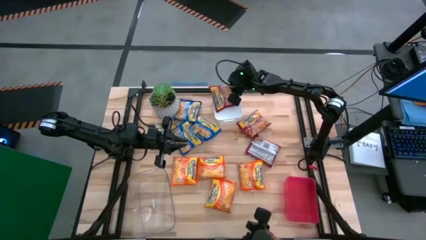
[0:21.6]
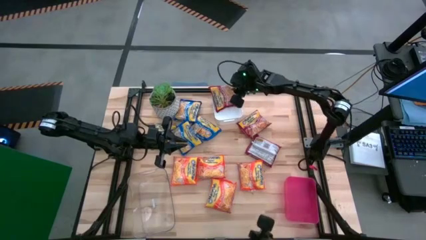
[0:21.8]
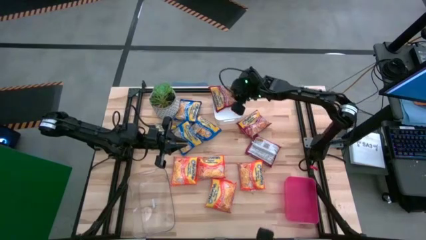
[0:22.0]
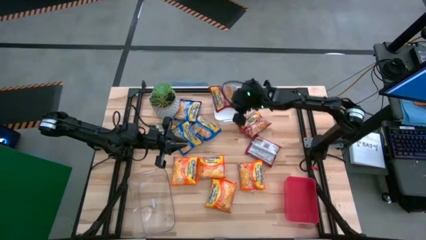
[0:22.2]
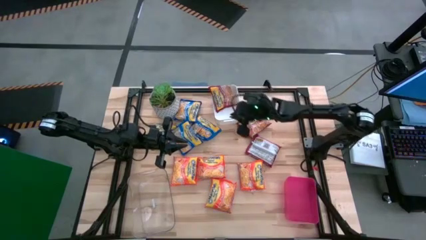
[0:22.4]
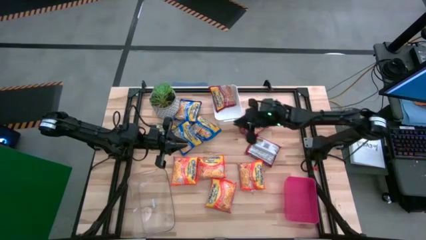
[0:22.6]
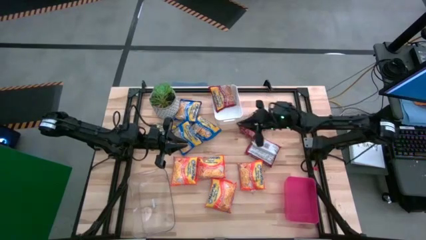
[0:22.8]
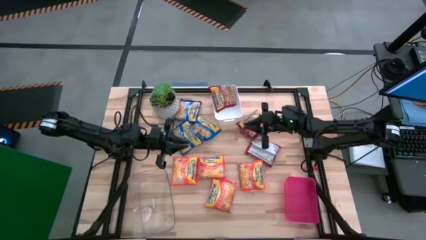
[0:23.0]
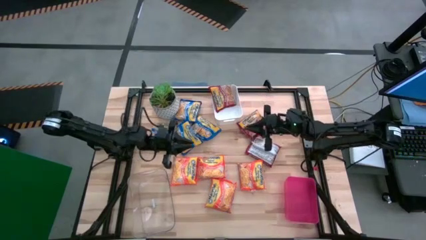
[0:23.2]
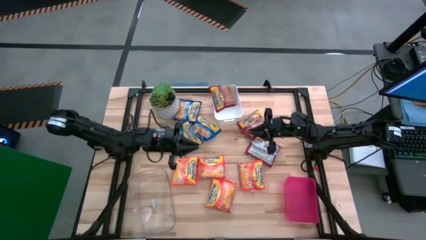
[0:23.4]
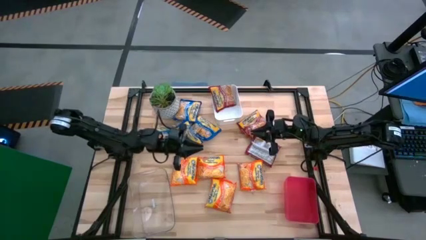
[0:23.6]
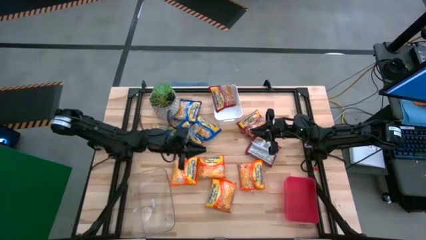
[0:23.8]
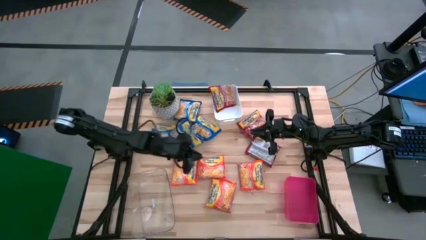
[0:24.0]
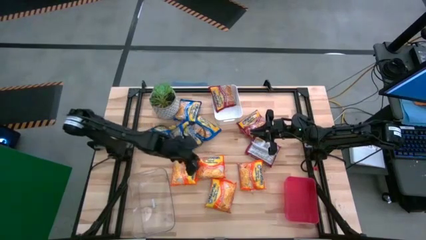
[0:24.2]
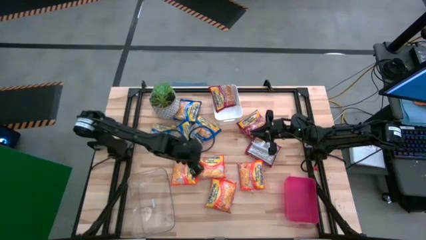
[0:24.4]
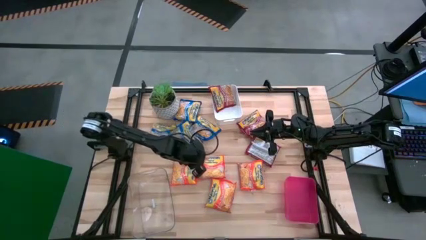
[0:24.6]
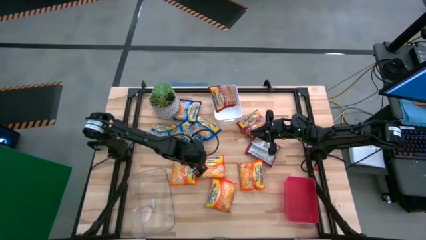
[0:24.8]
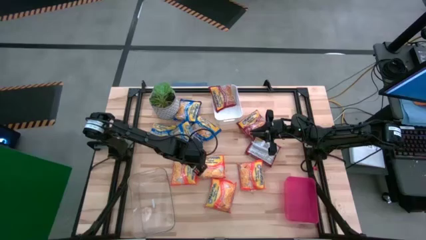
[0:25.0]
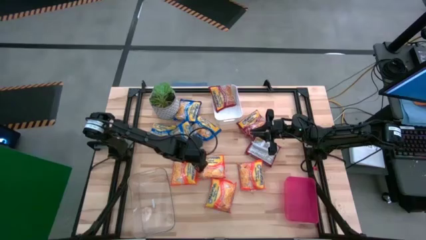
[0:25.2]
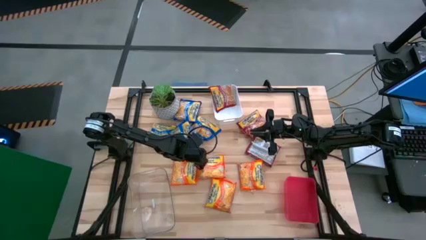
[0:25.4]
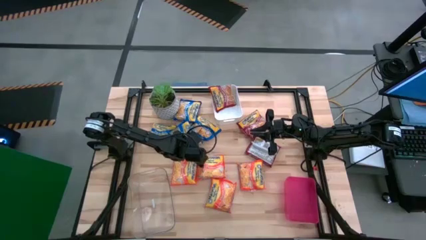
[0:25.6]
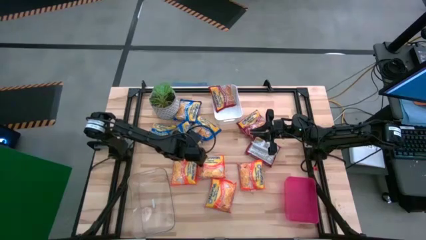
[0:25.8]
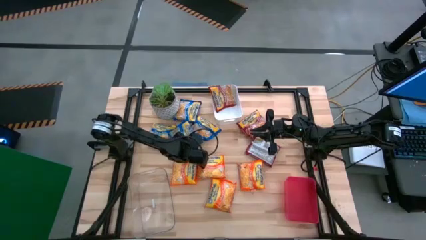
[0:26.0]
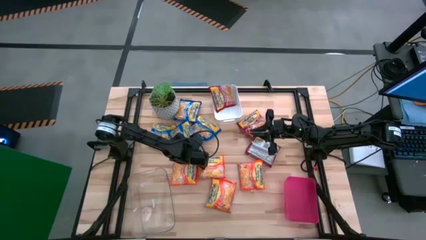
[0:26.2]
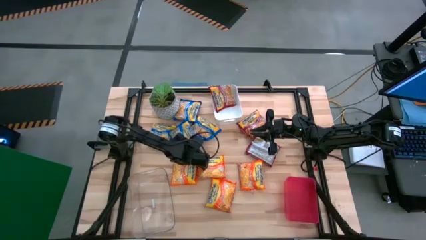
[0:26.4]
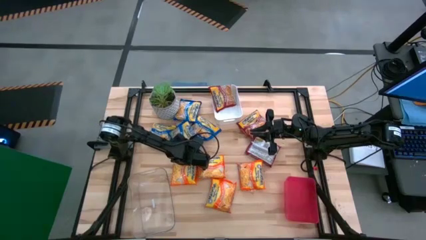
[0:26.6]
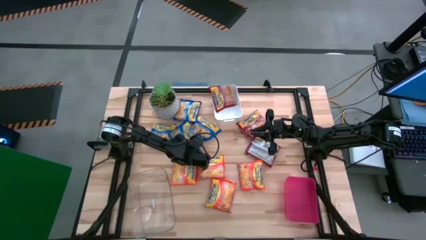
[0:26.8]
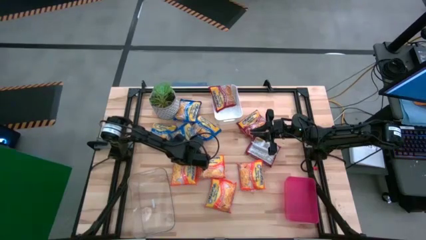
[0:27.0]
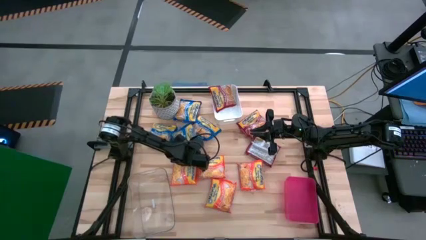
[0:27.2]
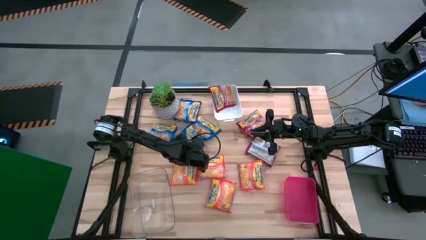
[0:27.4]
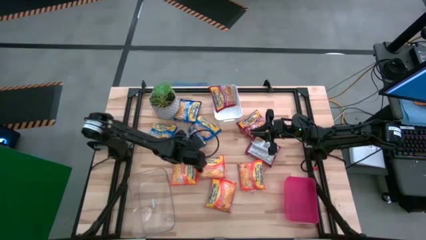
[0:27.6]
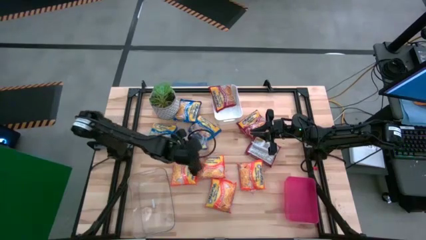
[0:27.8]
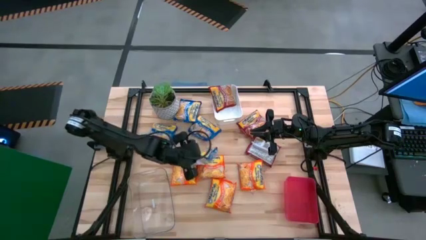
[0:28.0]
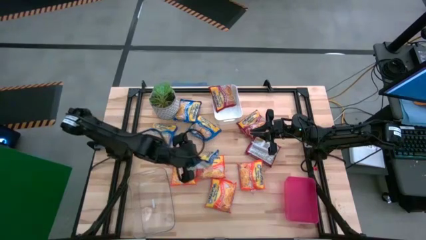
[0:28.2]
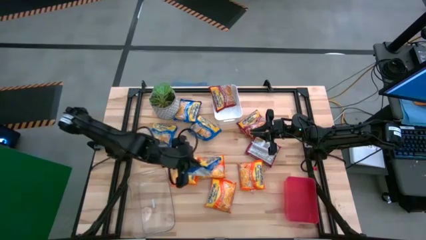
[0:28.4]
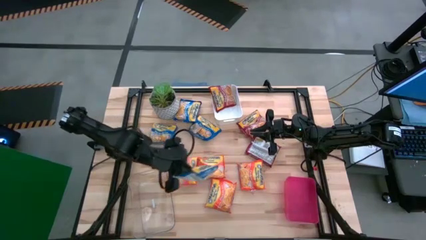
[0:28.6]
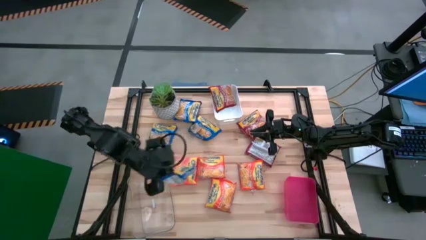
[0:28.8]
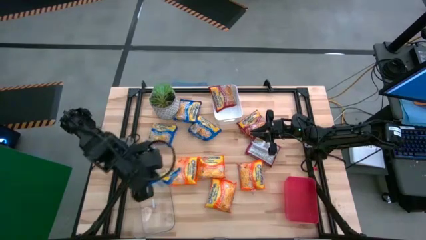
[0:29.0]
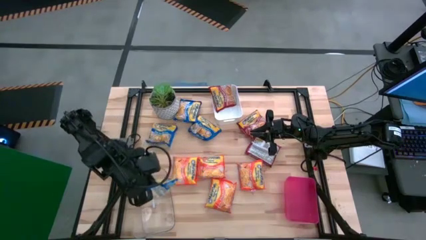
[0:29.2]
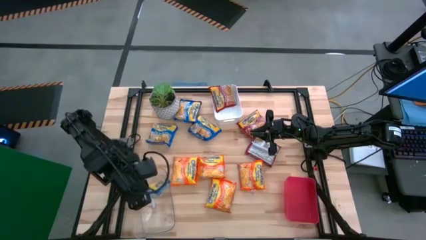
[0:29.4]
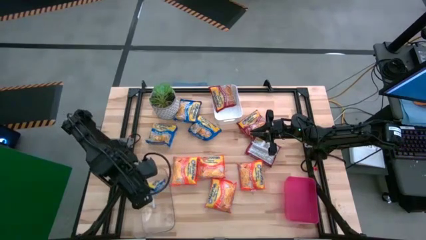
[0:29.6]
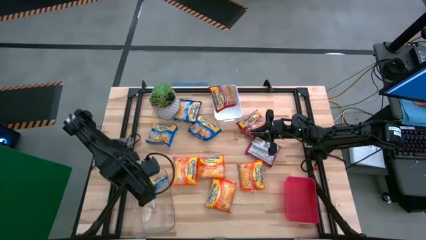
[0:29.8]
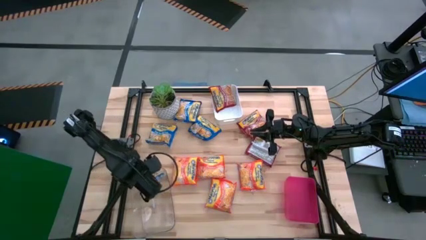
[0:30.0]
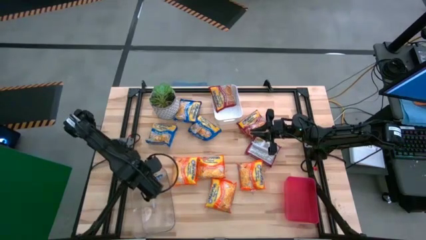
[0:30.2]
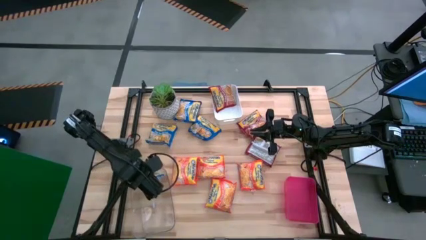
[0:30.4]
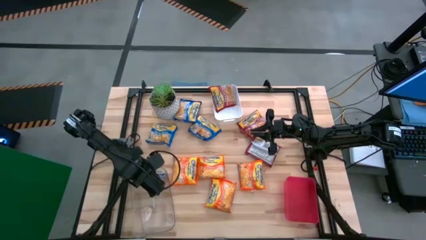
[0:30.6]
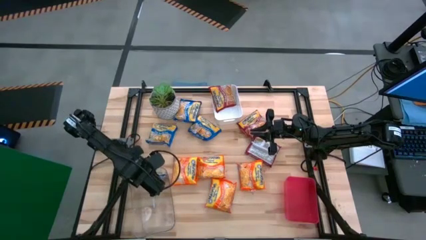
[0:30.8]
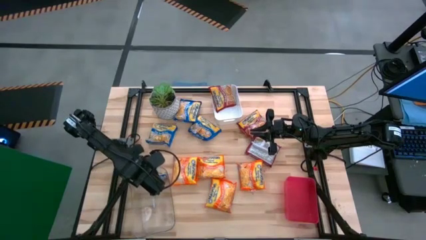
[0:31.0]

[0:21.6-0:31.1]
Task: Sort Maruchan noodles
Put the middle blue noodle pack into the transparent bin

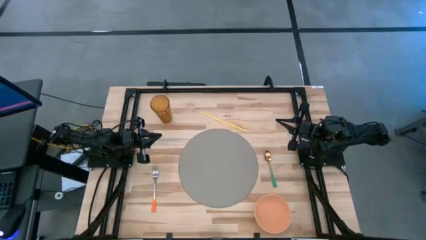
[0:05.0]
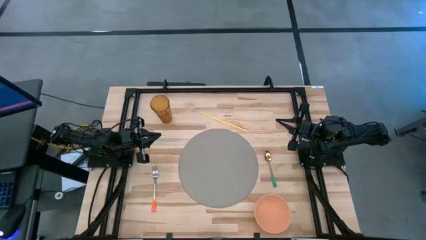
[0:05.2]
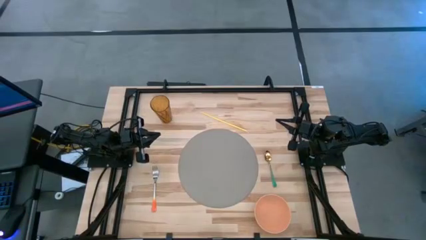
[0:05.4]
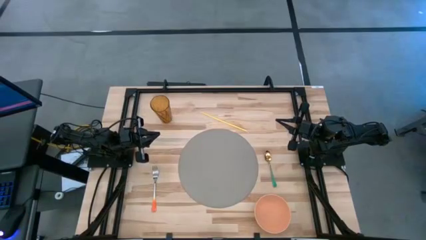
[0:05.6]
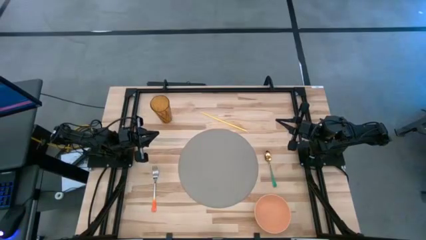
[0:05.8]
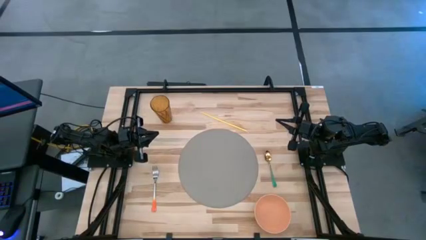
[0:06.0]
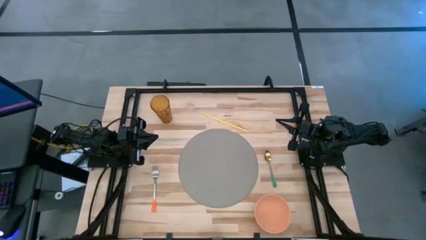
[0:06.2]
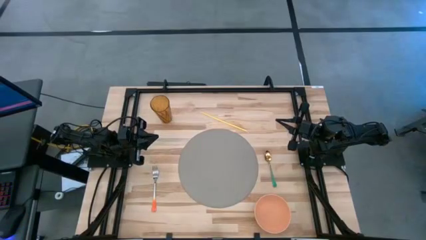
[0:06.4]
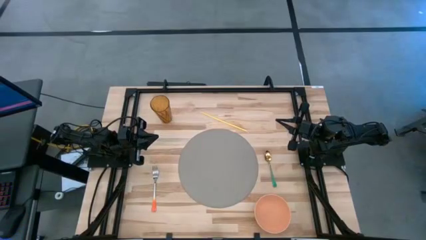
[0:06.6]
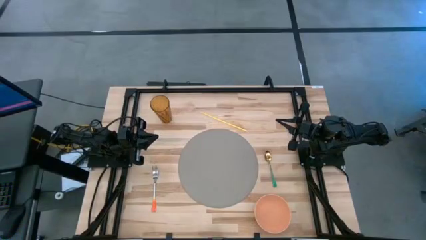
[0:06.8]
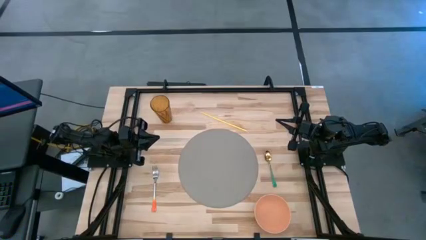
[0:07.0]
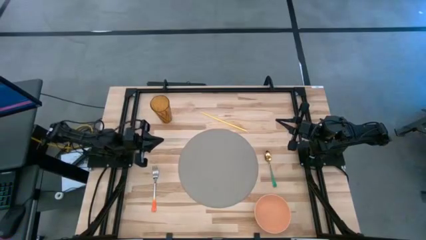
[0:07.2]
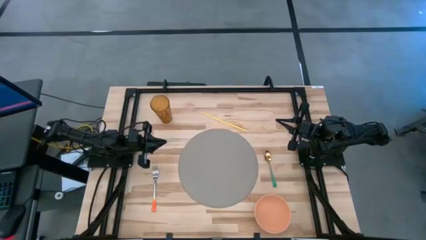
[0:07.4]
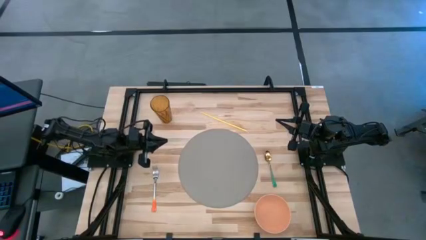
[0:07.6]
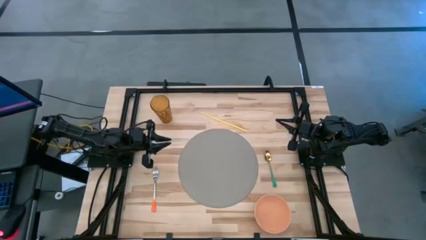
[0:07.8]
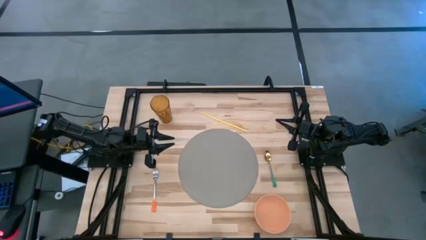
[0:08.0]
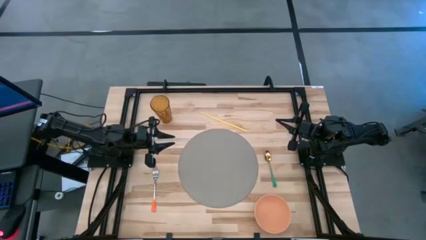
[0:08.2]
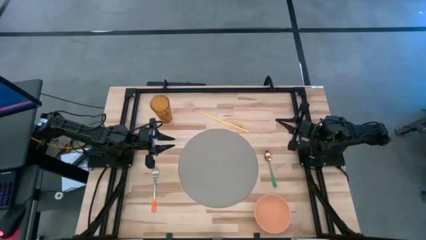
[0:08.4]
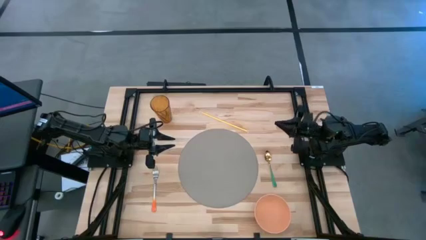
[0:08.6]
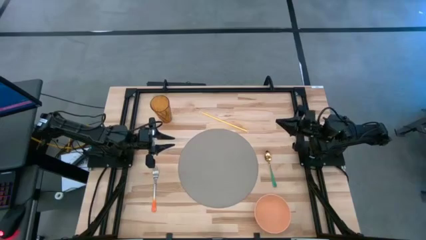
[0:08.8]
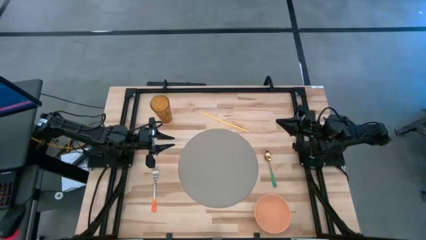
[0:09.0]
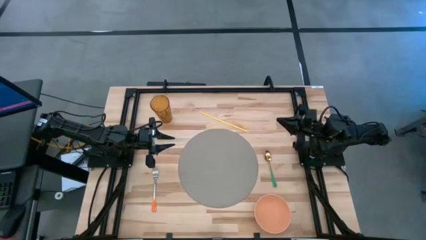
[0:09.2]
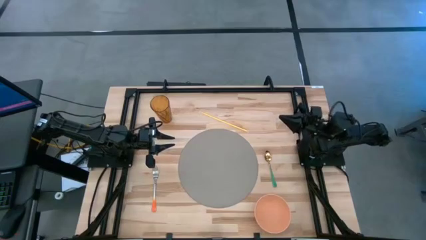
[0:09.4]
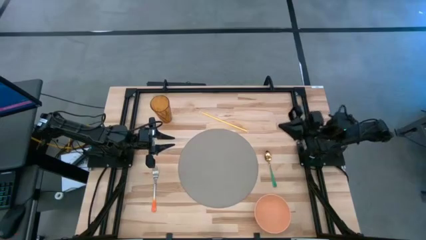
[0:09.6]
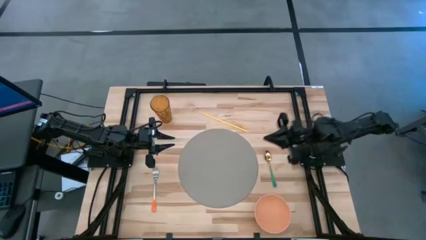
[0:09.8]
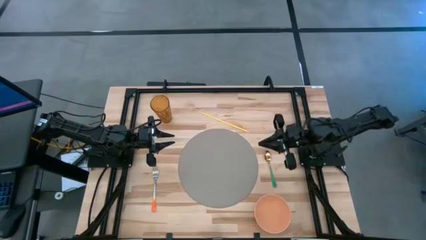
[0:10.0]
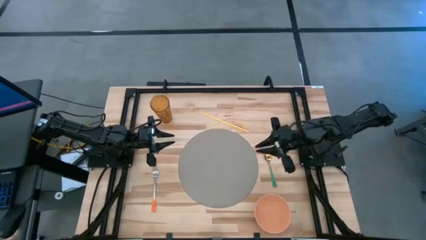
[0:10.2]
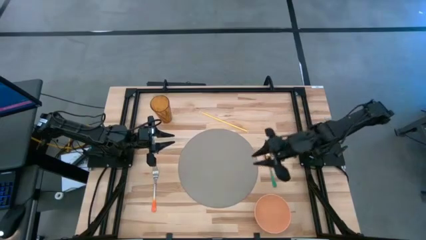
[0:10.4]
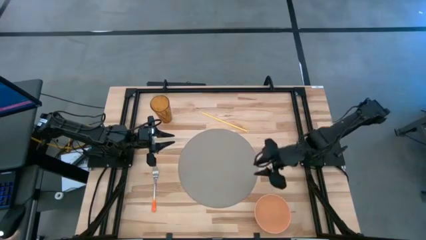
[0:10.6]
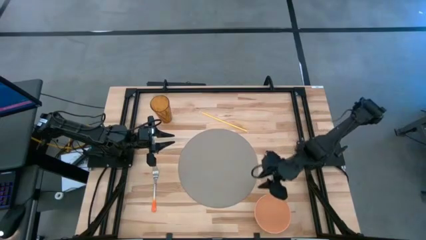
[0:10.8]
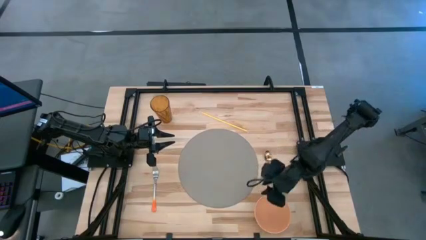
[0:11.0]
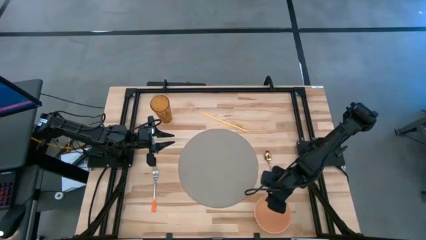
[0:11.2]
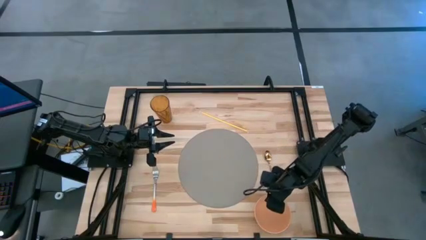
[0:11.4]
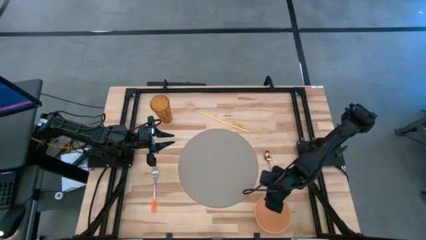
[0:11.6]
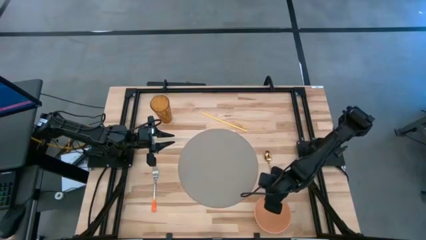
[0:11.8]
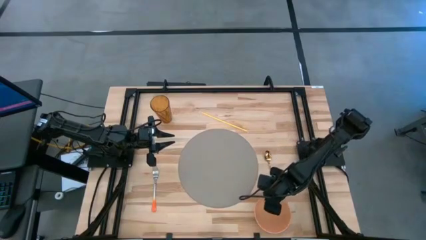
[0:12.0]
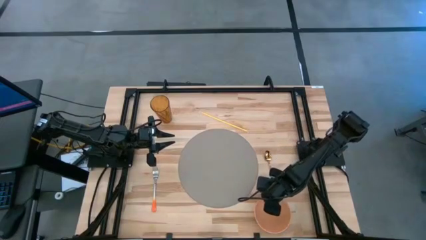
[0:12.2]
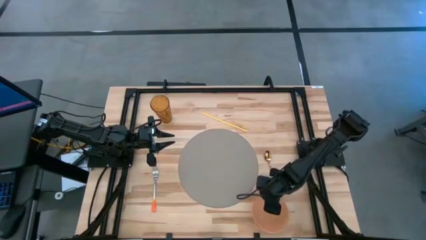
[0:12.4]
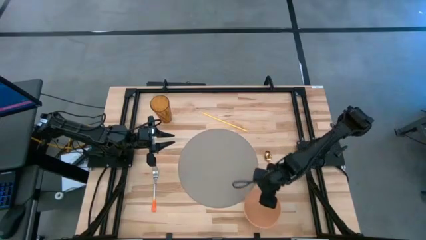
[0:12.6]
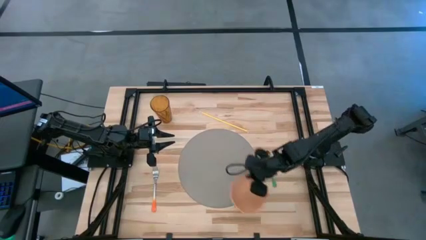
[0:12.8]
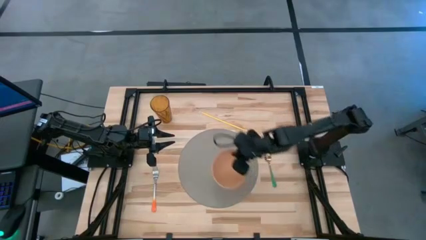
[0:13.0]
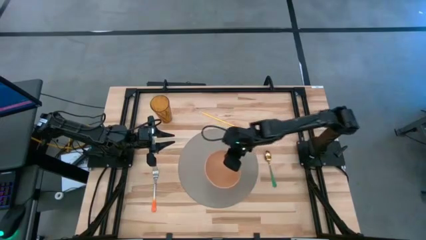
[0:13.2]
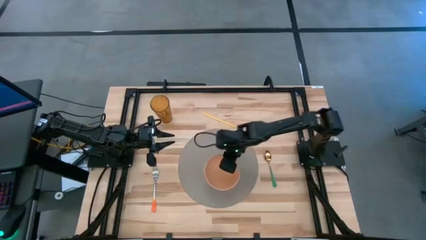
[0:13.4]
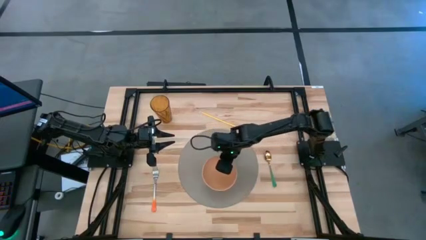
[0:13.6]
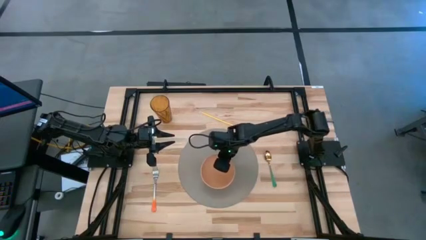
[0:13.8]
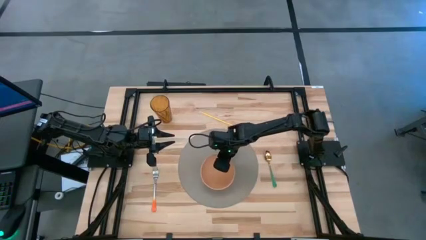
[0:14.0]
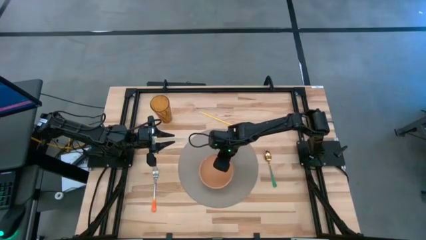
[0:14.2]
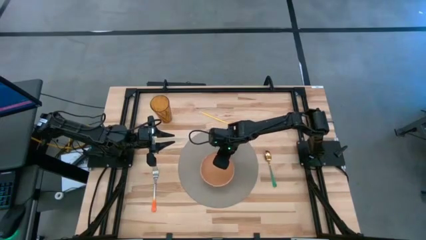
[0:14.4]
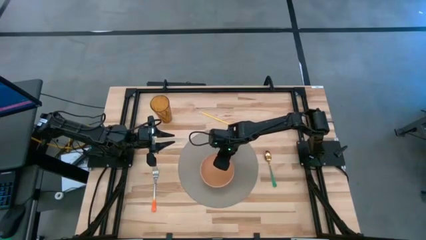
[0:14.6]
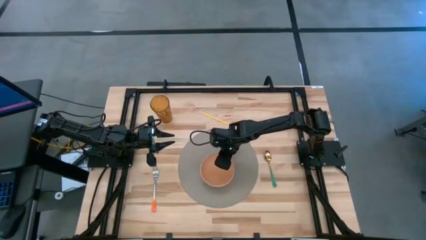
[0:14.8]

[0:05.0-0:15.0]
Task: Pick & Place Utensil
Put the orange bowl on the gray table mat
